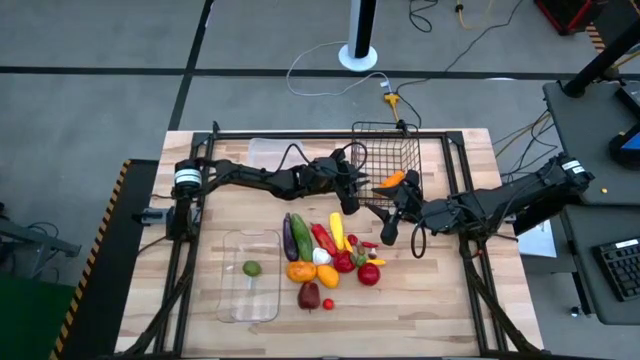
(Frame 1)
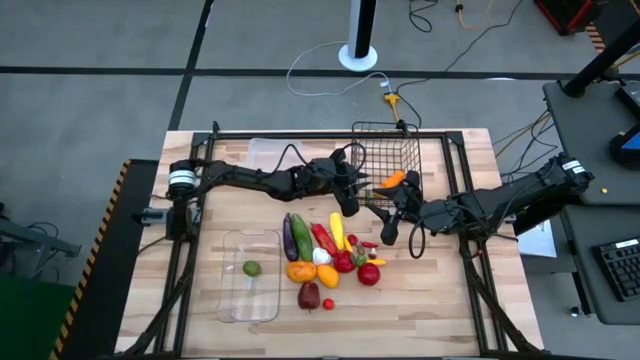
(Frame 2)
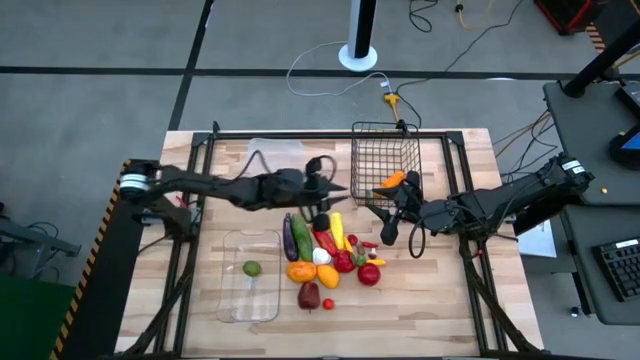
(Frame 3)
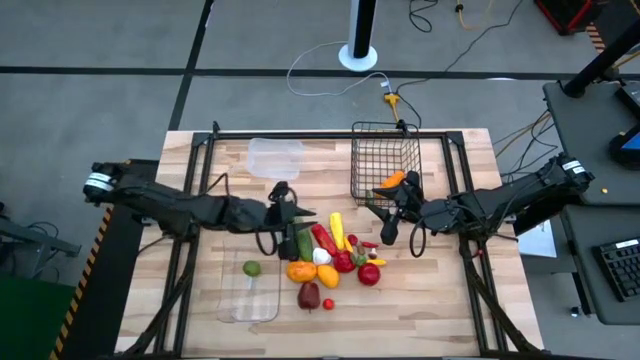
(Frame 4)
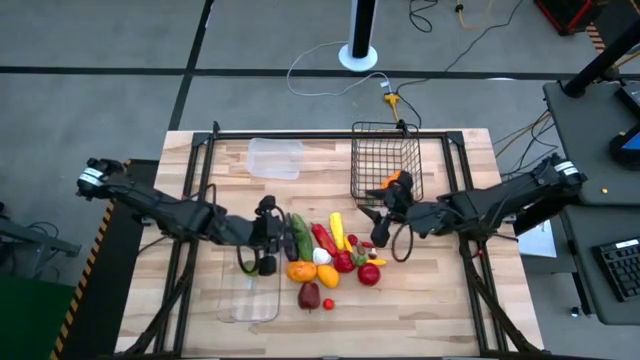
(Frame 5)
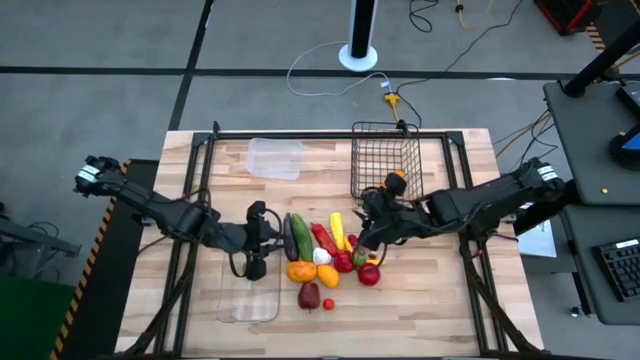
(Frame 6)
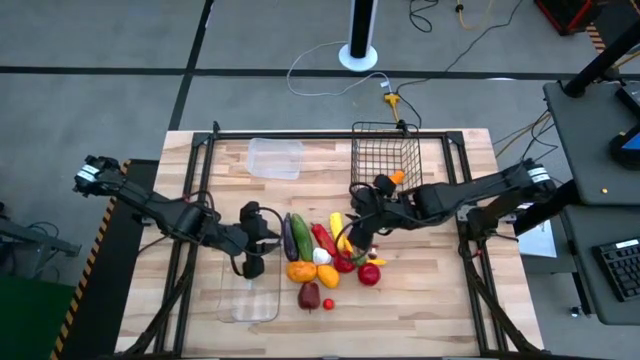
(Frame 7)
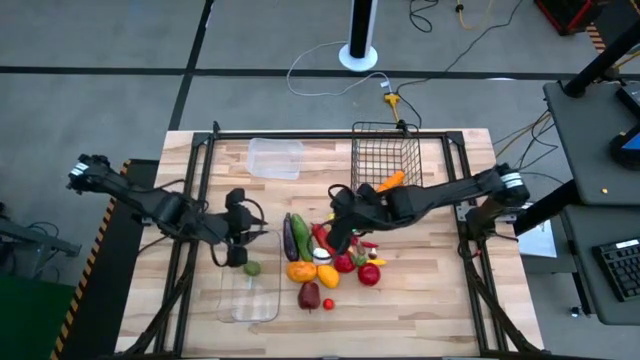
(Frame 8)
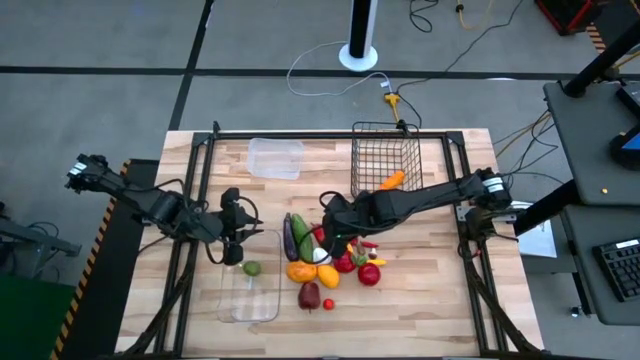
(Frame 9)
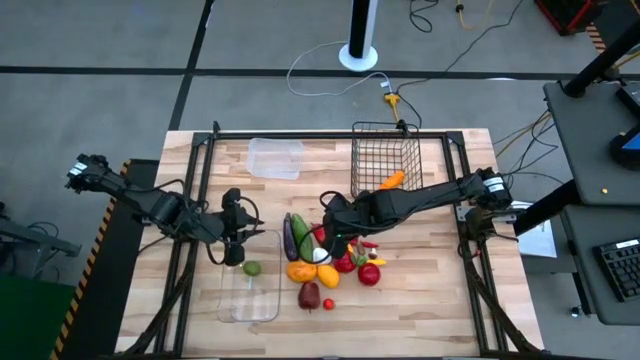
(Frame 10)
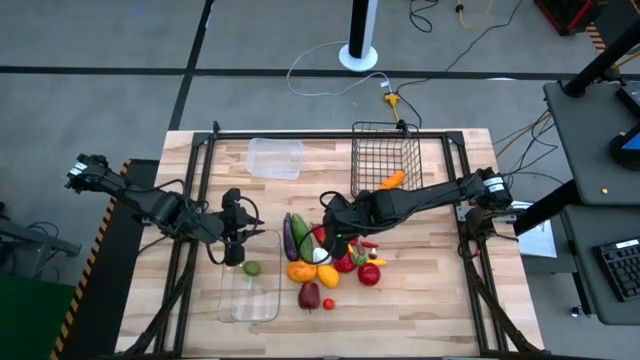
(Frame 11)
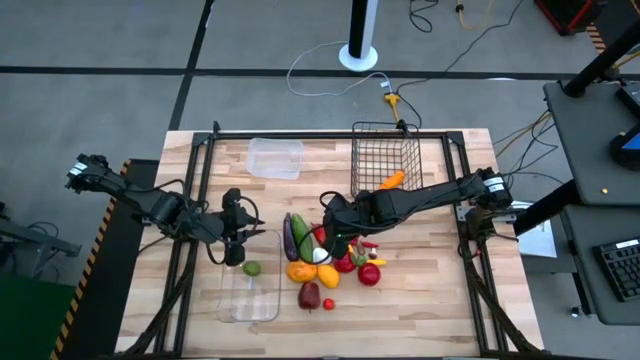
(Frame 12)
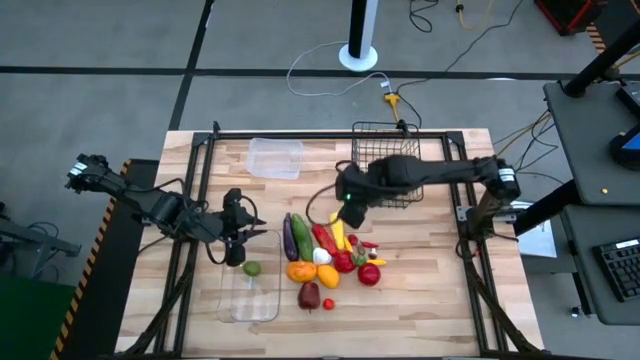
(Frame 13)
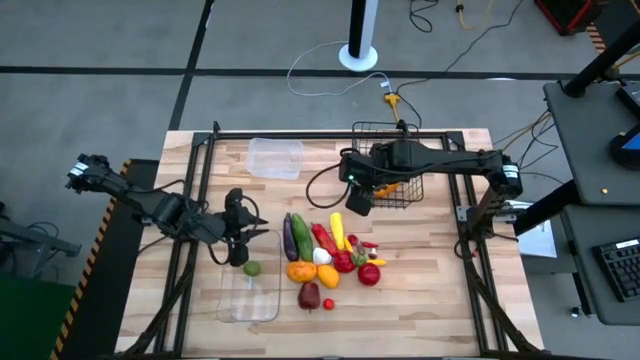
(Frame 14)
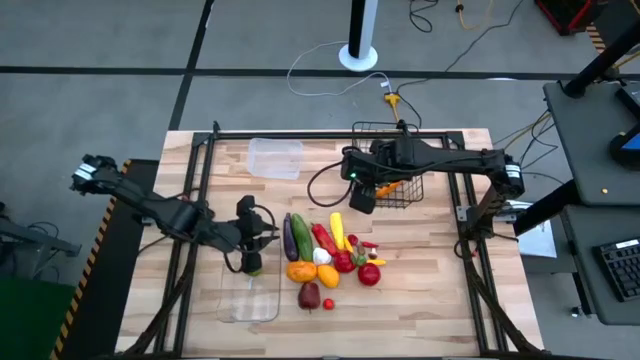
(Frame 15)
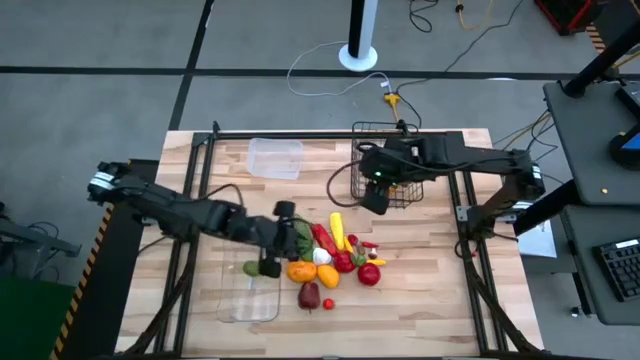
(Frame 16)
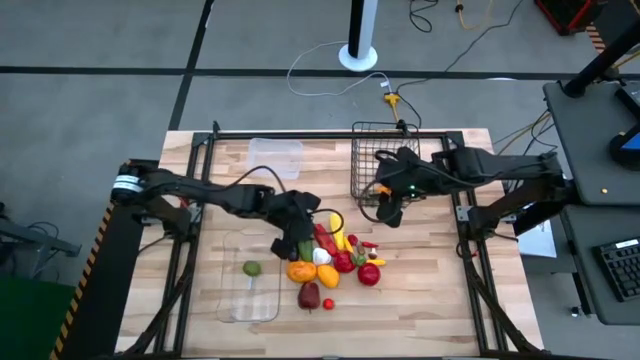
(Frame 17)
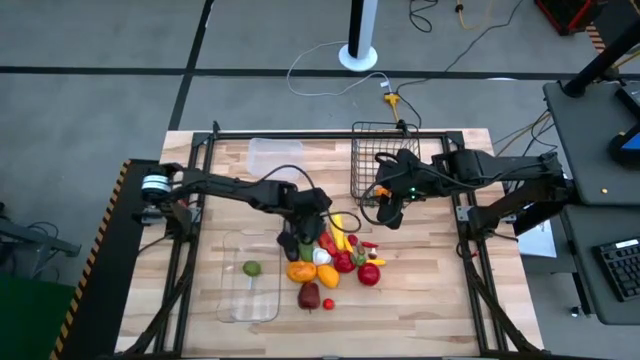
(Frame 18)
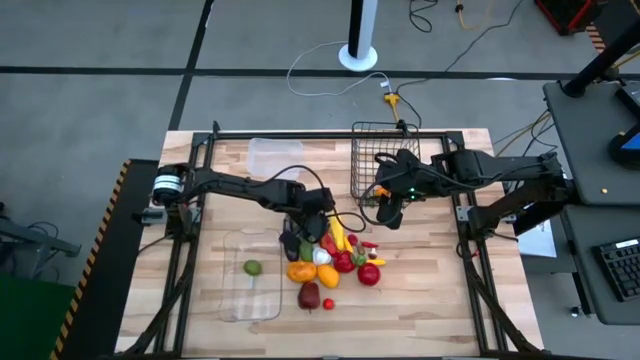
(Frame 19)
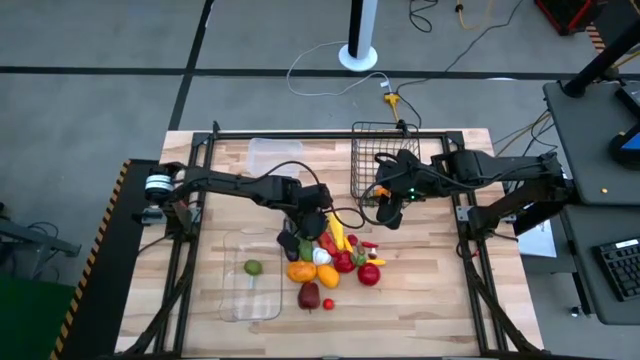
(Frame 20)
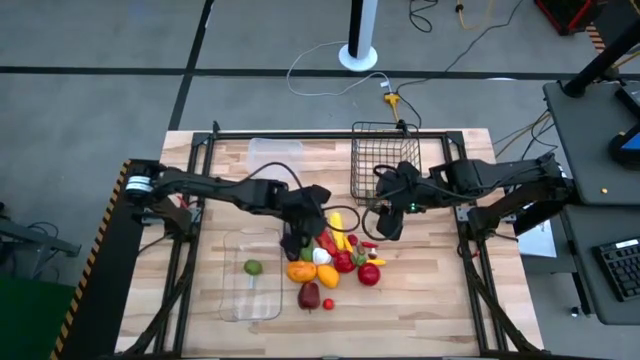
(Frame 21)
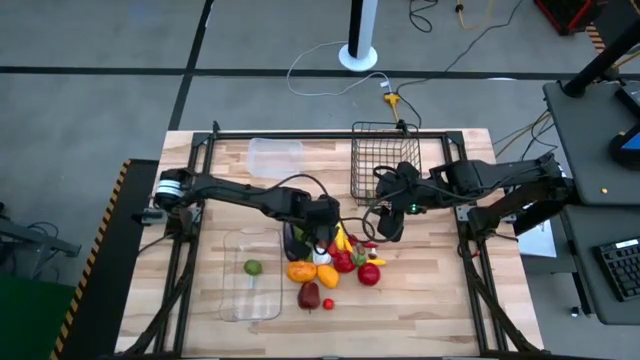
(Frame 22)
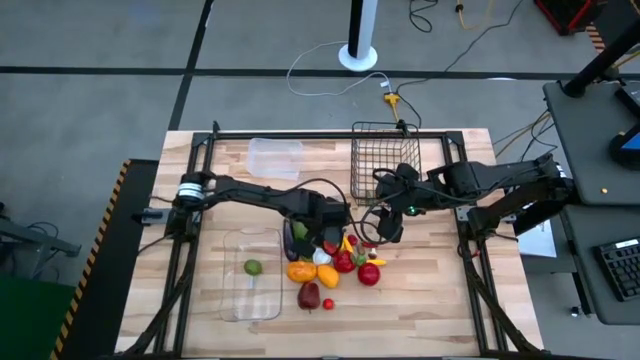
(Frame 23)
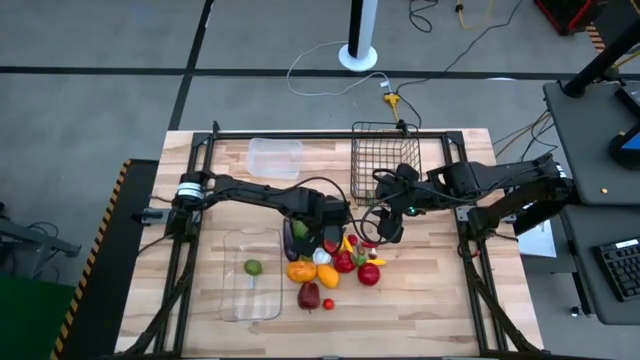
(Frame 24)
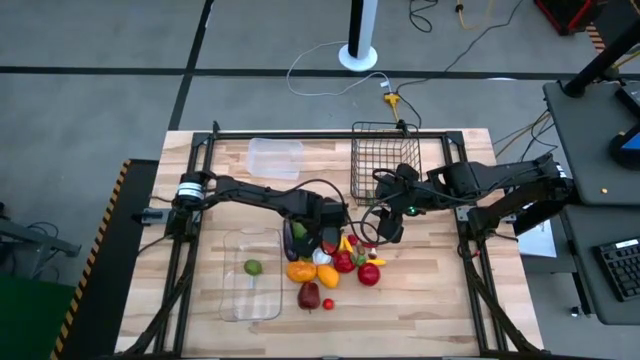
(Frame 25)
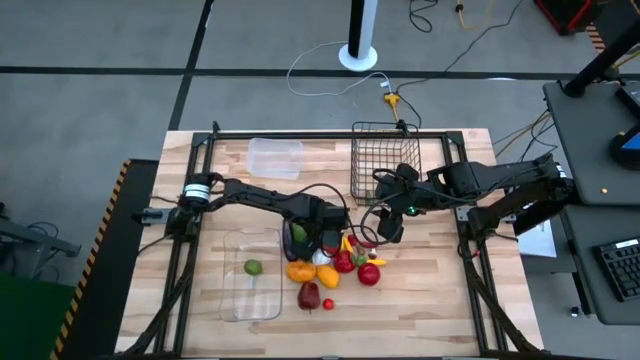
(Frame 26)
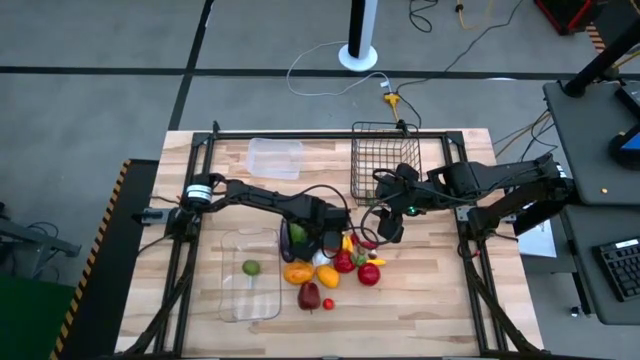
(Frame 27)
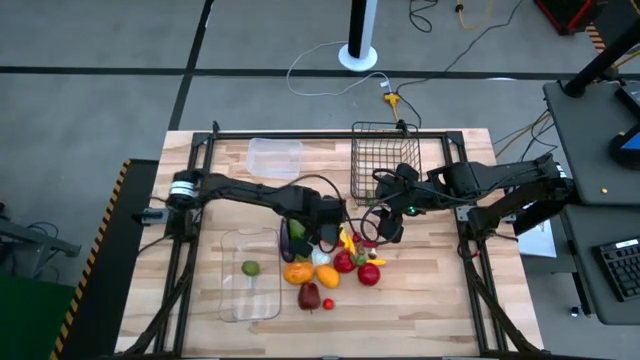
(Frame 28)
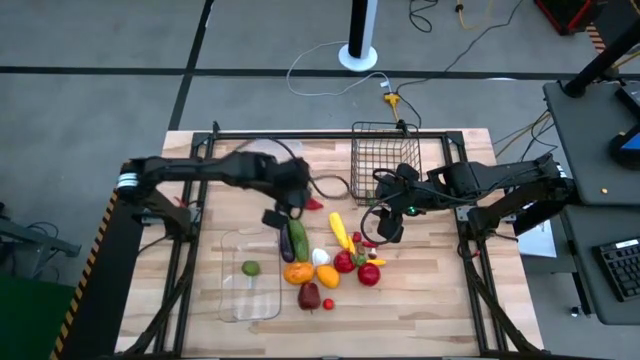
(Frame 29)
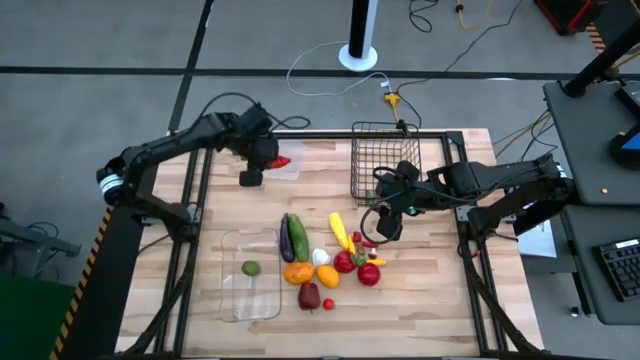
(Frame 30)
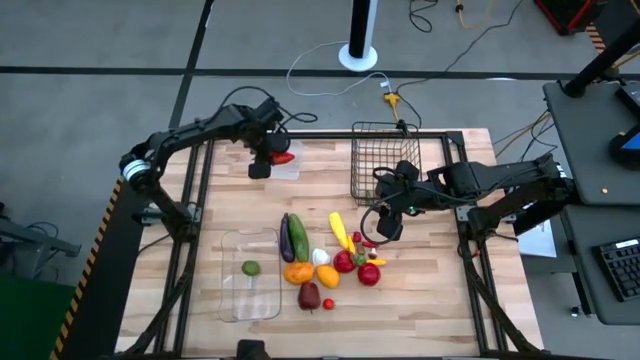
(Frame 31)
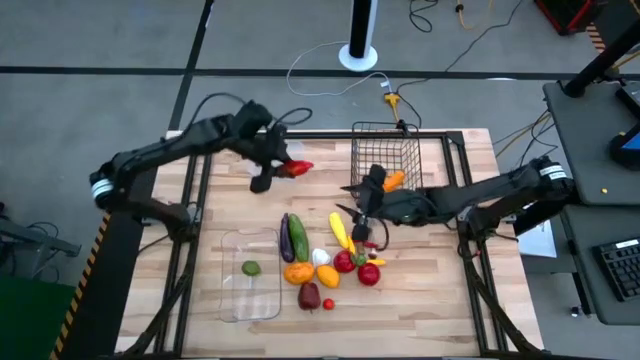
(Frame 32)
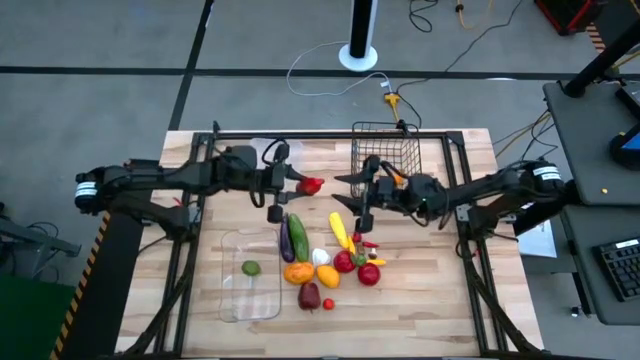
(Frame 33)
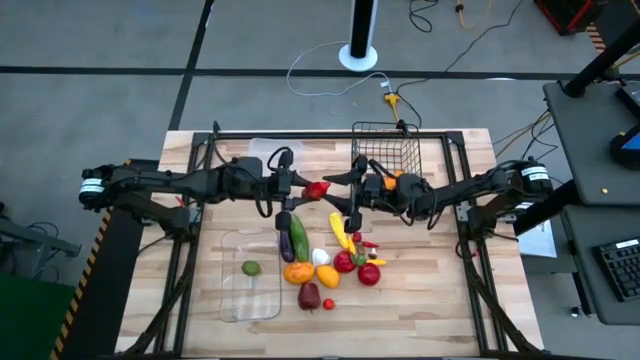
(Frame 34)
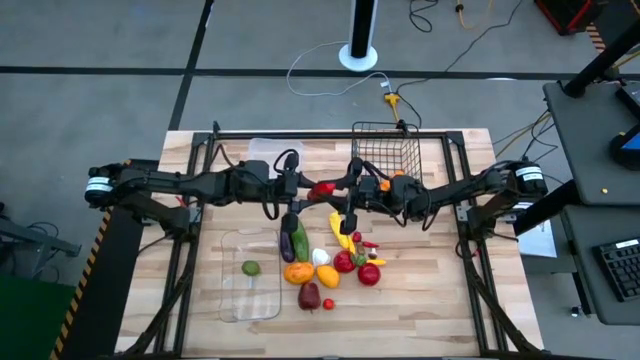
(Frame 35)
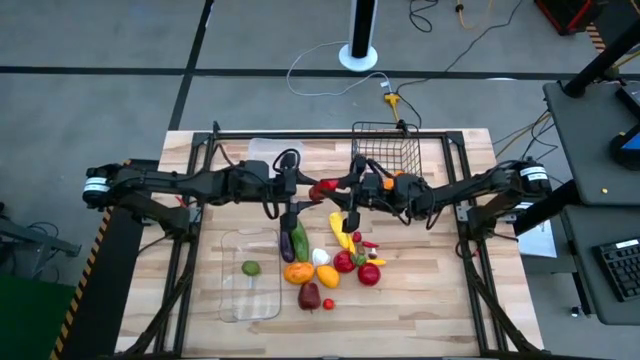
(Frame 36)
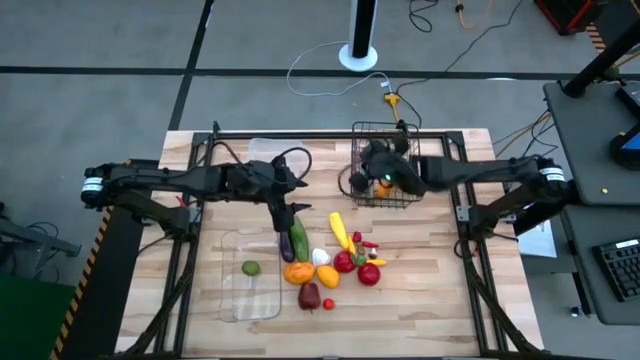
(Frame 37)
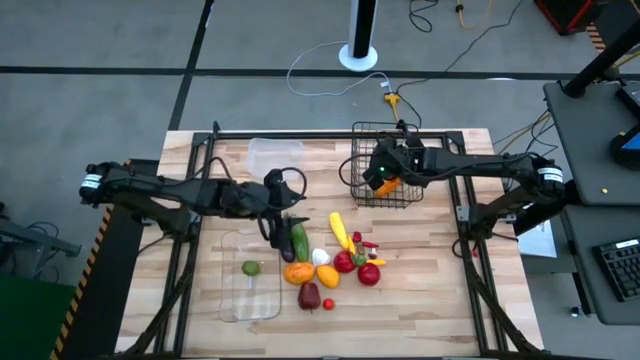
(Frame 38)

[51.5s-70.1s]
Task: Sort produce into baskets
Put the red bell pepper into the wire basket

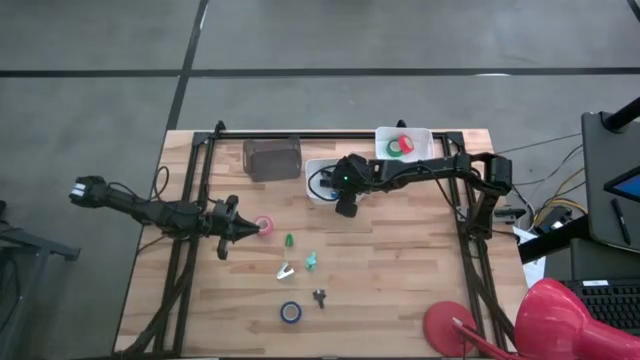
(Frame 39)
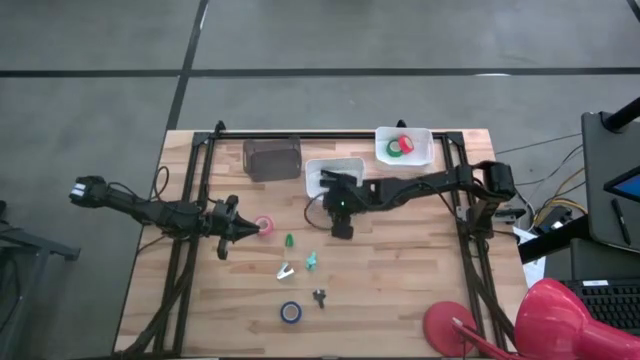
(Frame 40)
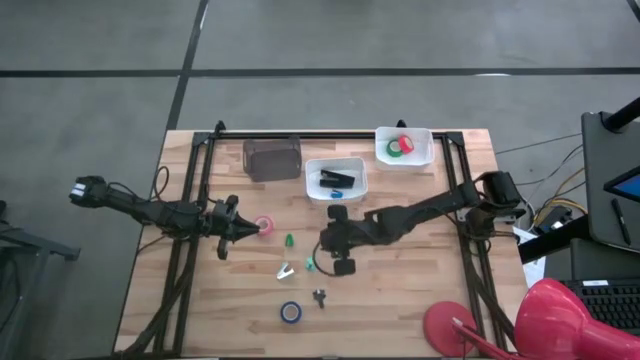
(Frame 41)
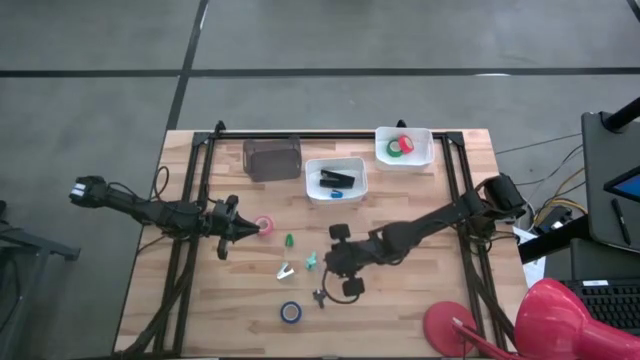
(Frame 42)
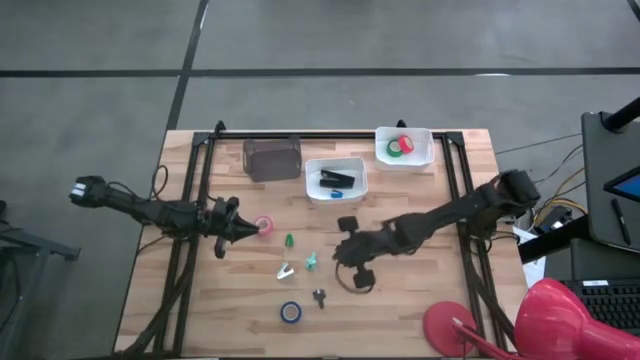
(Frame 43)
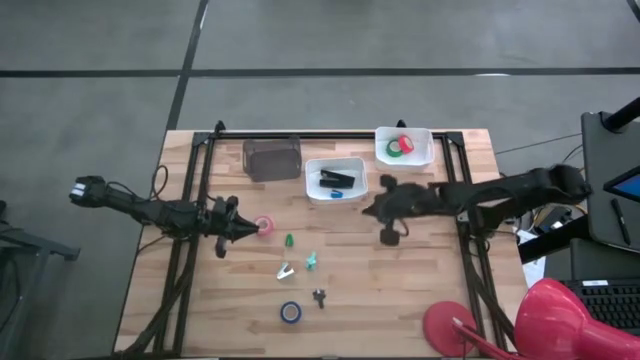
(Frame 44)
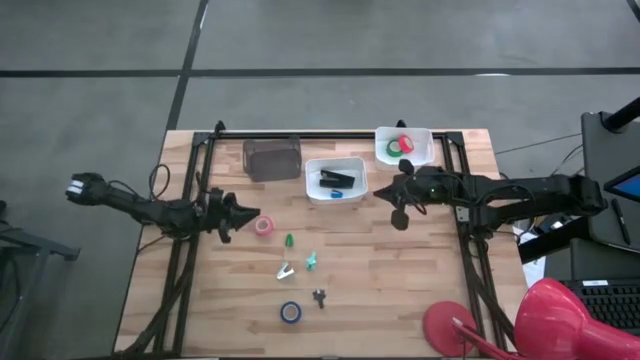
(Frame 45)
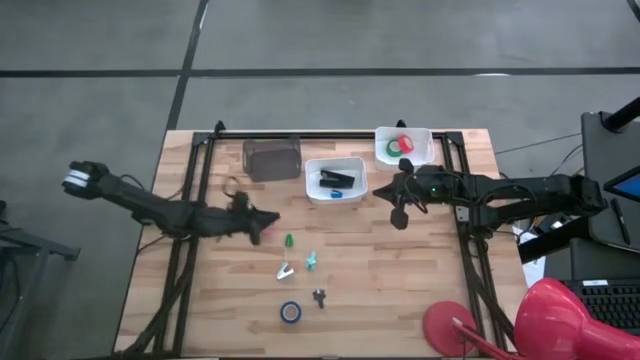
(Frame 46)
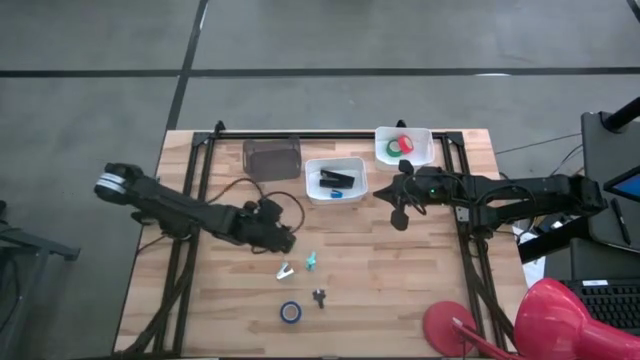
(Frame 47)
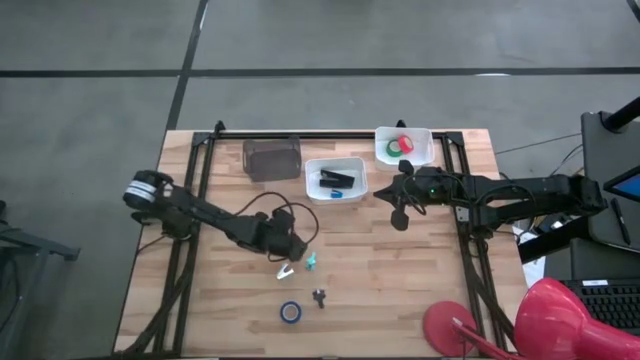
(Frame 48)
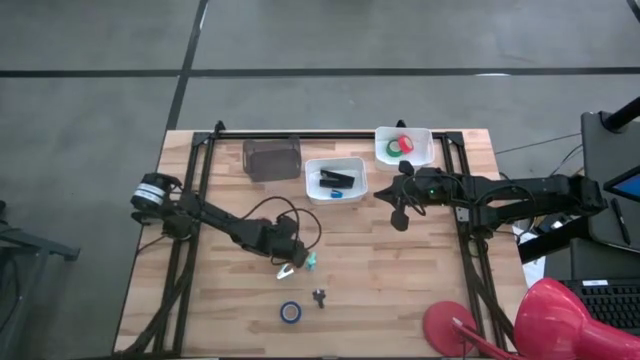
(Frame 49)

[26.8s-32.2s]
Task: Pick and place Stapler, Stapler remover, tape
Put the green stapler into the left white bin
